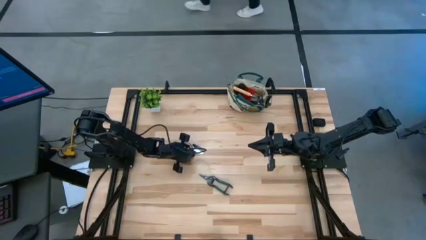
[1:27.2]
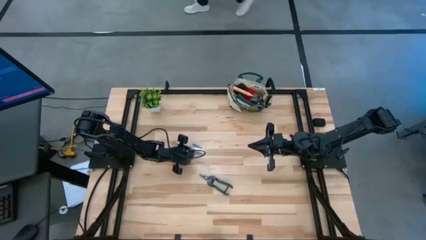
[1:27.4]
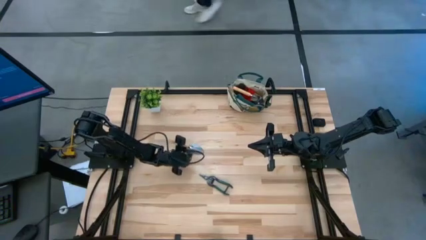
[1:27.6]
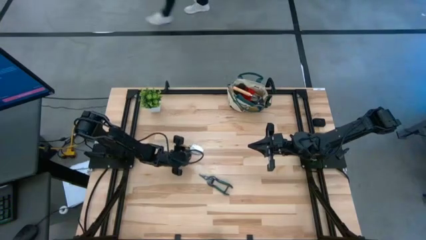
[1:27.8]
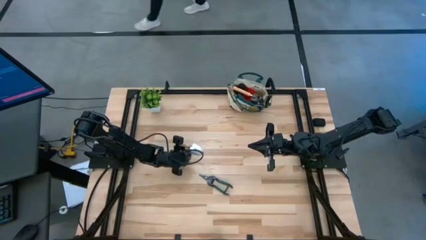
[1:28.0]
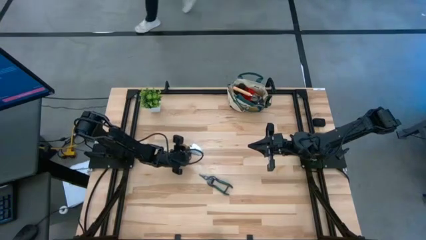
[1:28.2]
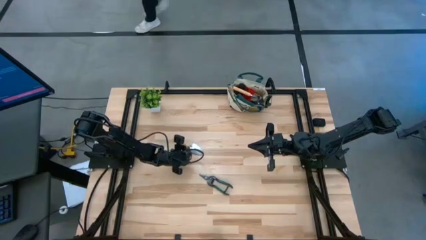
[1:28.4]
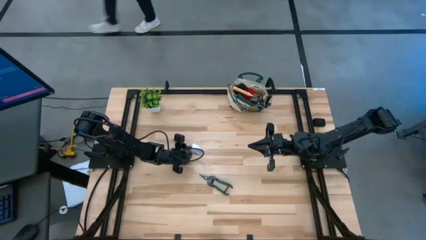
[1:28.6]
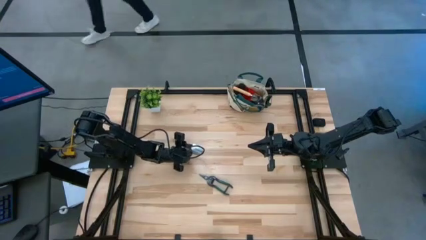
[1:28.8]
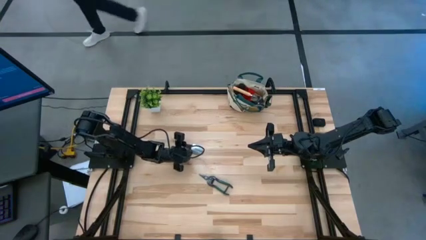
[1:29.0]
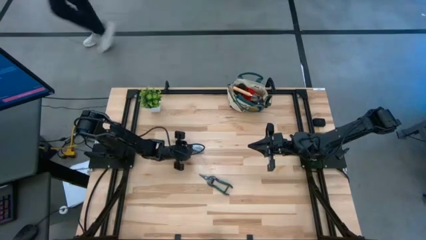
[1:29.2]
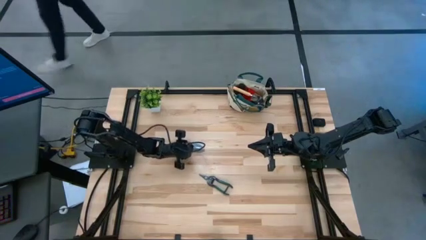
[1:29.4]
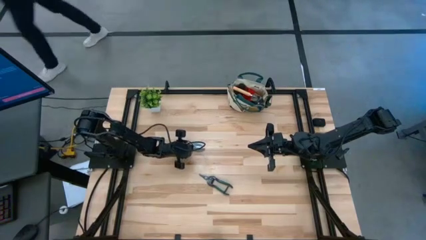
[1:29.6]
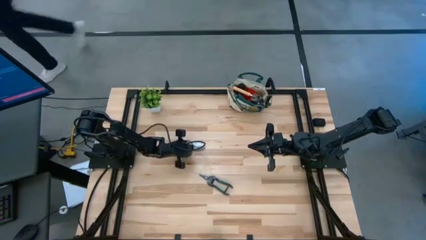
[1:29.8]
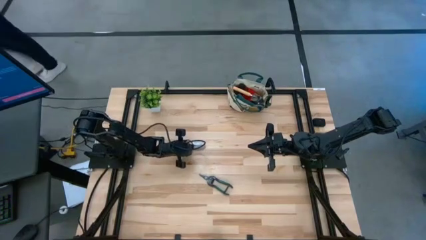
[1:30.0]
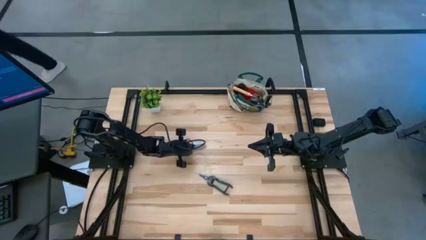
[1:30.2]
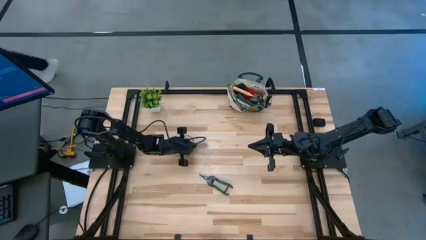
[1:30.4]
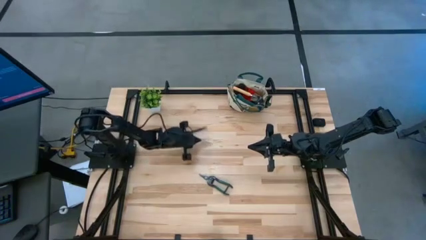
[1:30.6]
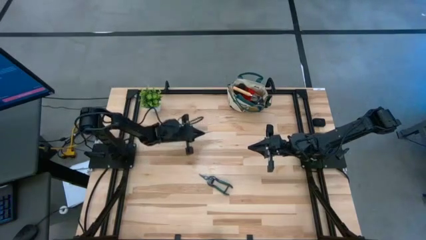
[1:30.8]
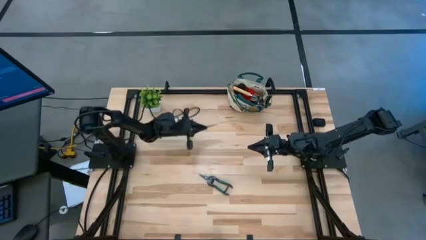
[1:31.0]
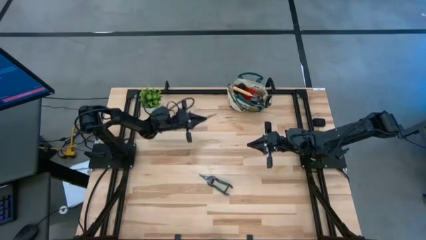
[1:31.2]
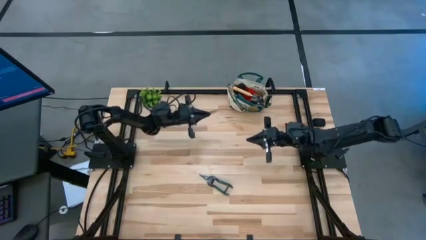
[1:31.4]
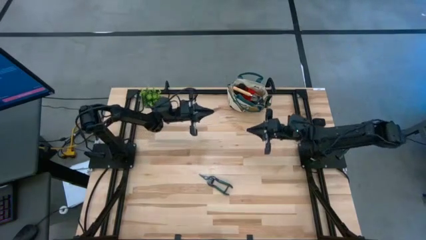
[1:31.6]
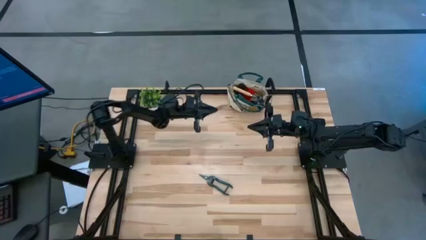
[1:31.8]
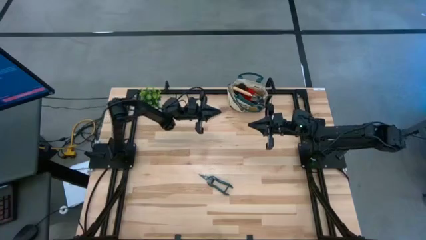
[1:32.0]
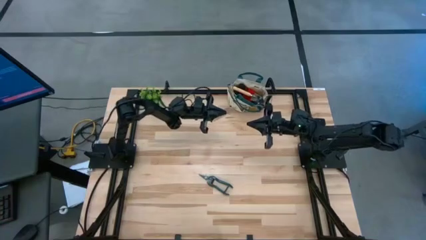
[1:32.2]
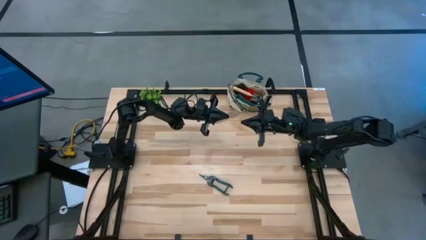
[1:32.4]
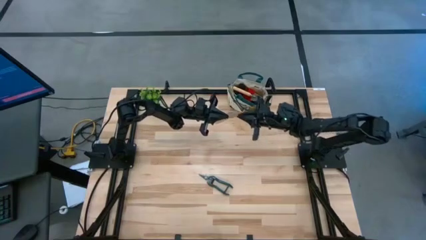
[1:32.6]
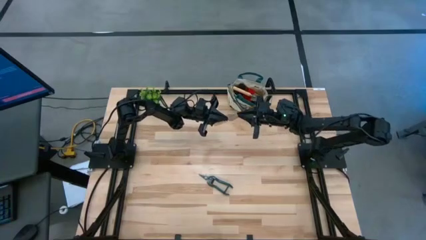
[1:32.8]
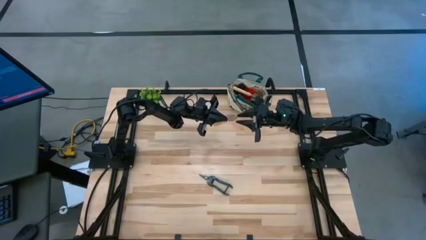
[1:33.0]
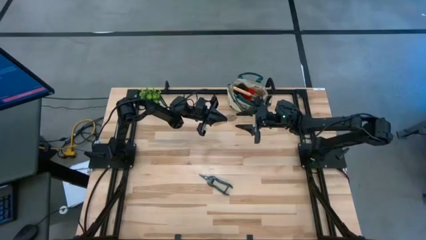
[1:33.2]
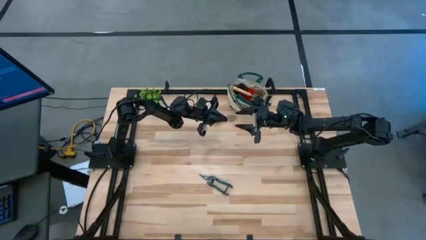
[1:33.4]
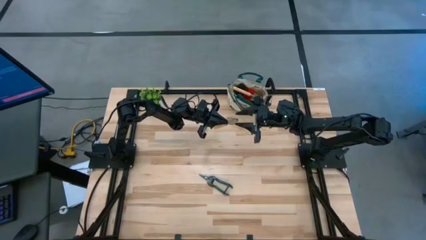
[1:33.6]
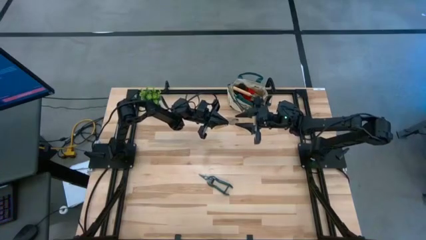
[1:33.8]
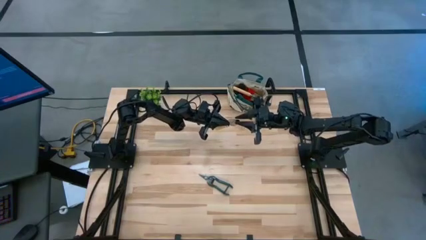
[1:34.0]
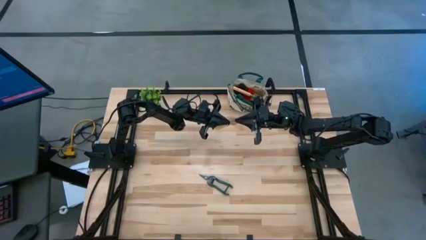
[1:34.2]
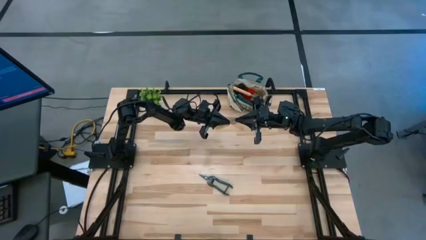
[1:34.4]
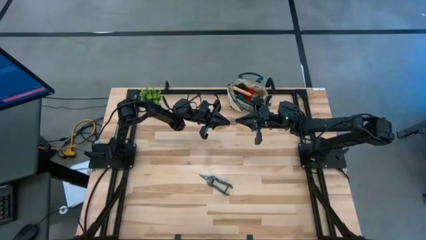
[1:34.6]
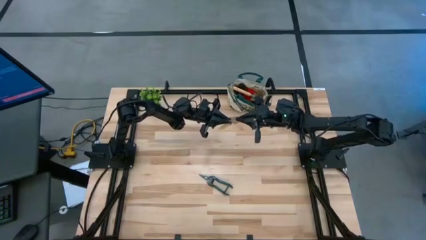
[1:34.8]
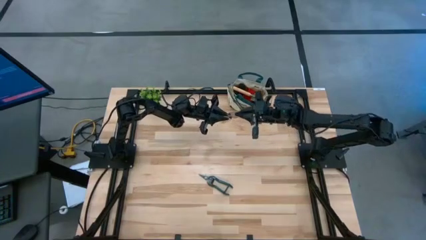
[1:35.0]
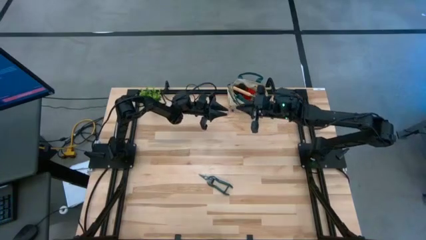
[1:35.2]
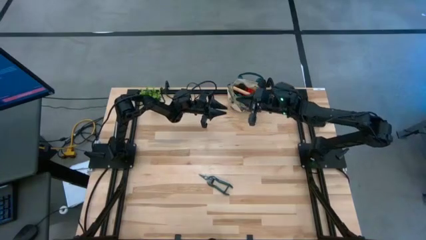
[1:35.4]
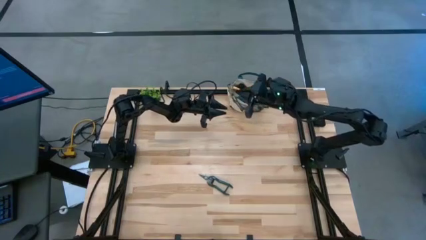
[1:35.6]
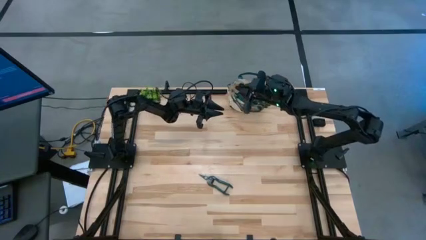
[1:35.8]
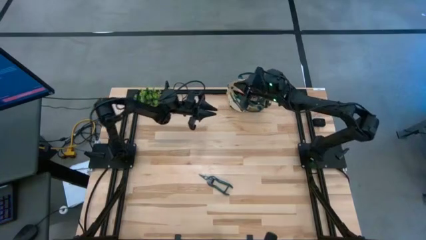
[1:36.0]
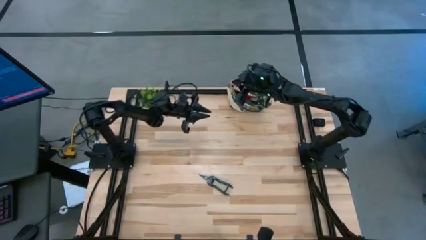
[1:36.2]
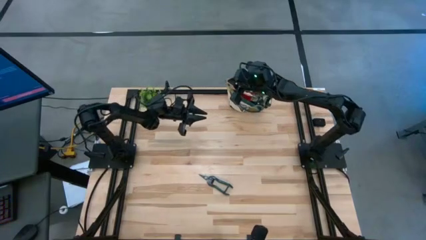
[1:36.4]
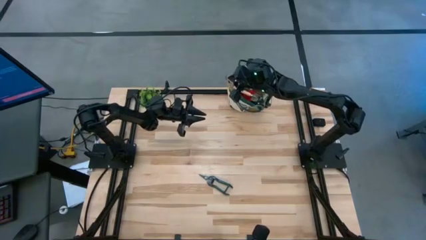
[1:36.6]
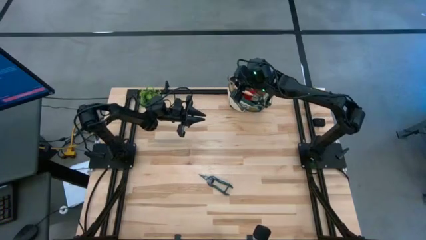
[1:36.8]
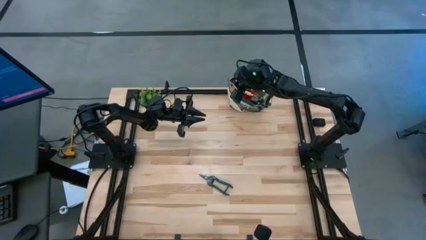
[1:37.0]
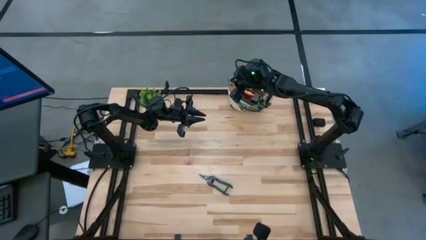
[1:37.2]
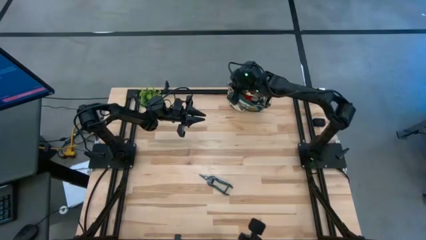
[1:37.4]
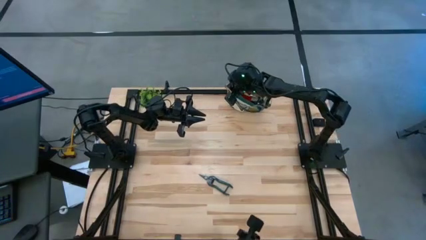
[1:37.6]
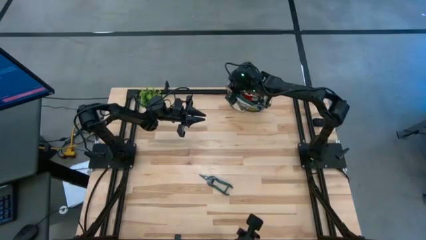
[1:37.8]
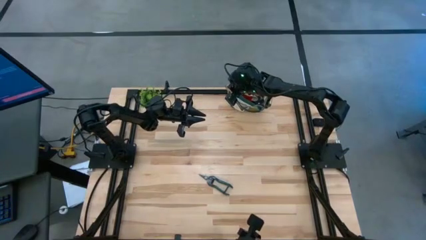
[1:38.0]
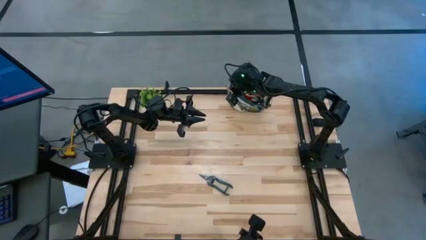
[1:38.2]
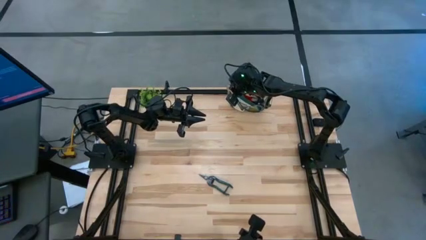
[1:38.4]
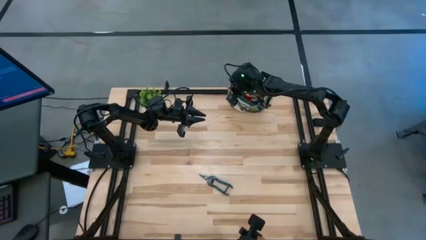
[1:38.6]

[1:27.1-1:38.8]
Task: Pick & Place Garden tools in Gardening bag
Put the brown trowel into the gardening bag

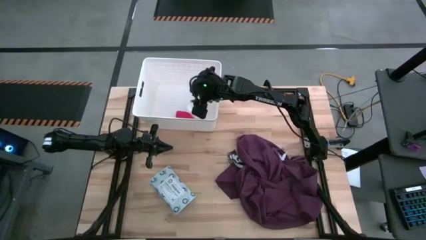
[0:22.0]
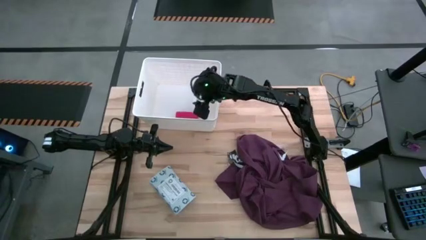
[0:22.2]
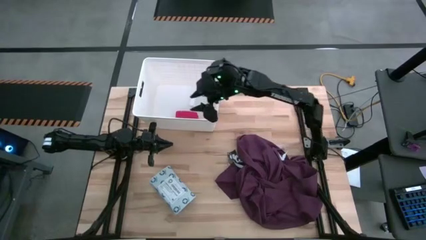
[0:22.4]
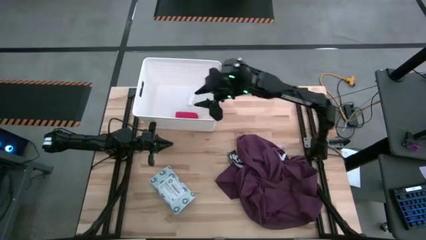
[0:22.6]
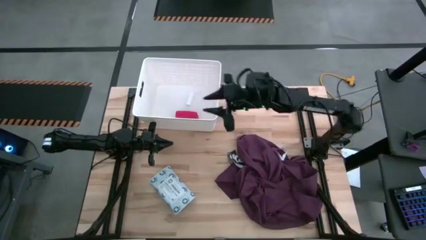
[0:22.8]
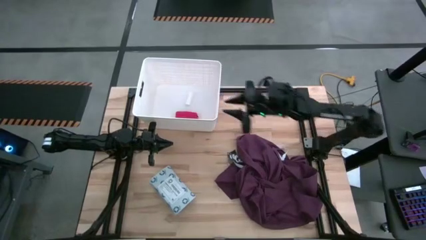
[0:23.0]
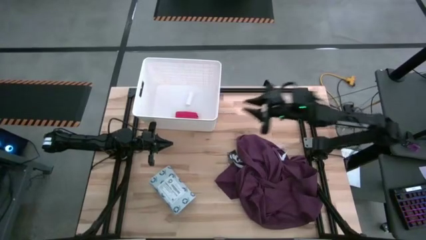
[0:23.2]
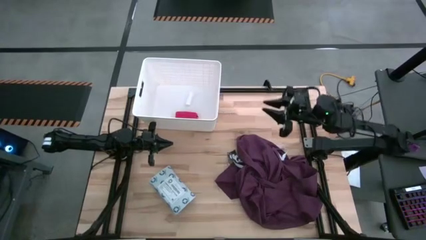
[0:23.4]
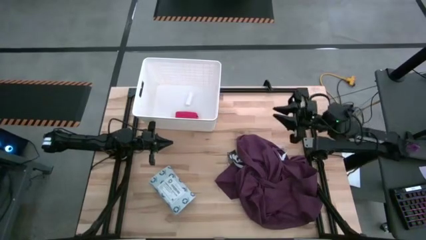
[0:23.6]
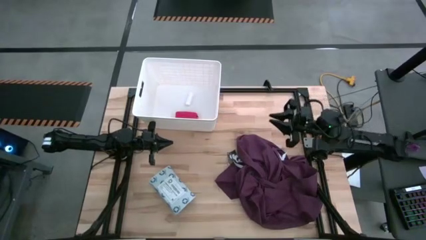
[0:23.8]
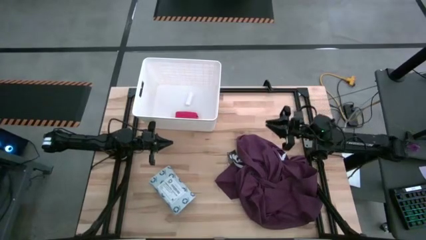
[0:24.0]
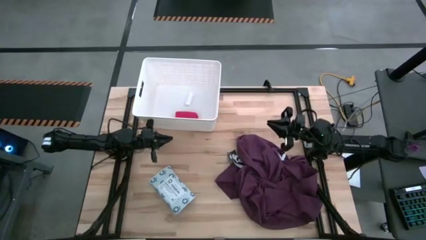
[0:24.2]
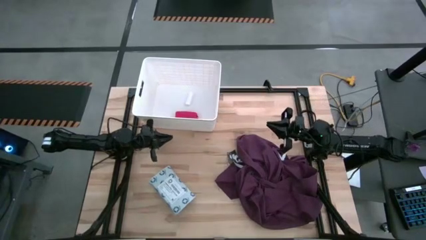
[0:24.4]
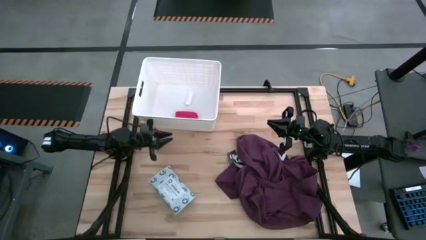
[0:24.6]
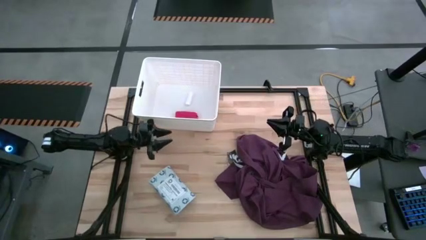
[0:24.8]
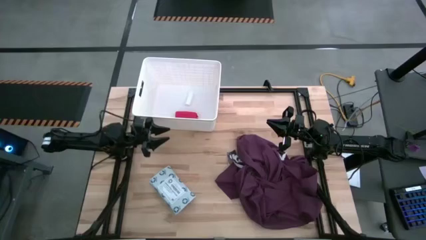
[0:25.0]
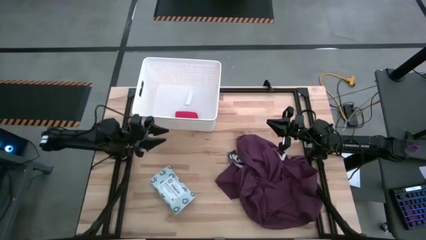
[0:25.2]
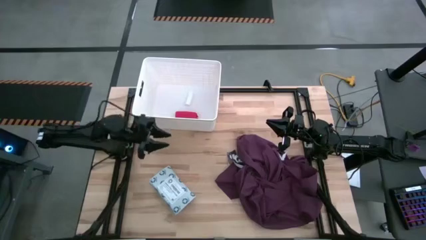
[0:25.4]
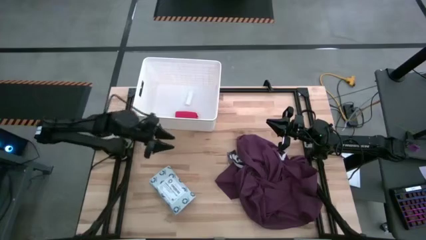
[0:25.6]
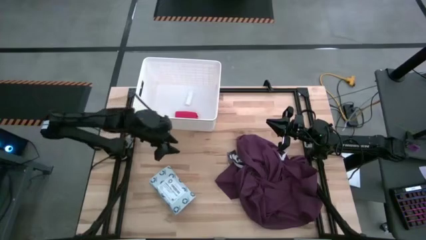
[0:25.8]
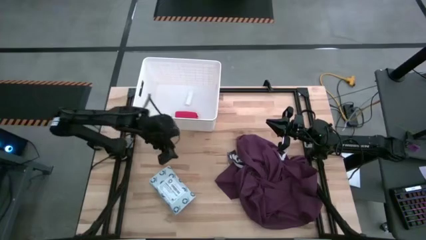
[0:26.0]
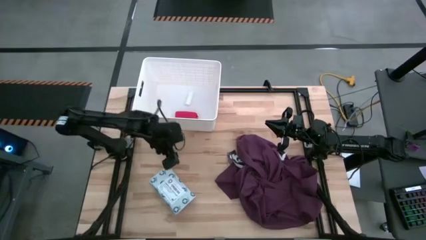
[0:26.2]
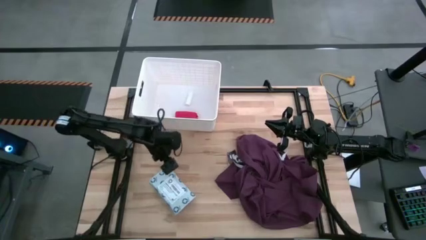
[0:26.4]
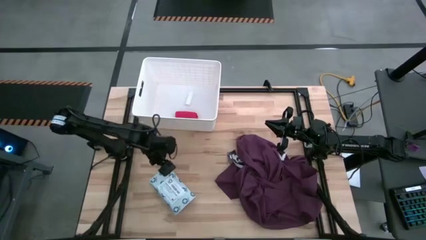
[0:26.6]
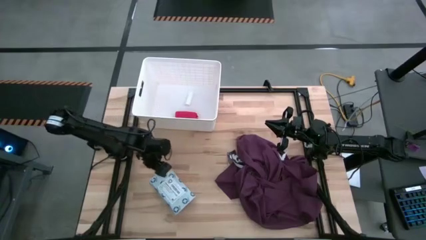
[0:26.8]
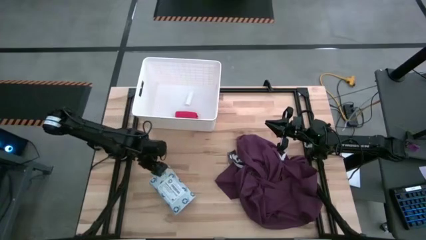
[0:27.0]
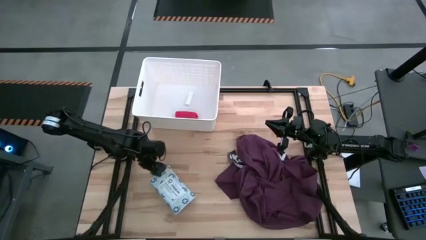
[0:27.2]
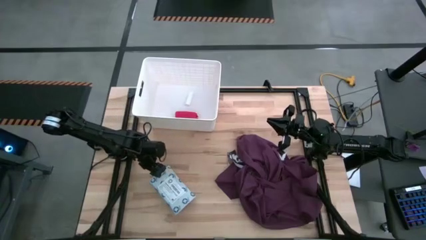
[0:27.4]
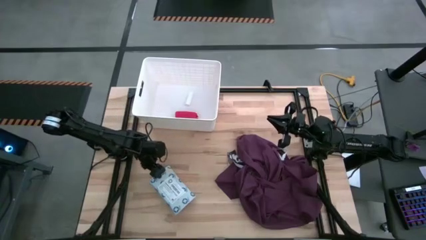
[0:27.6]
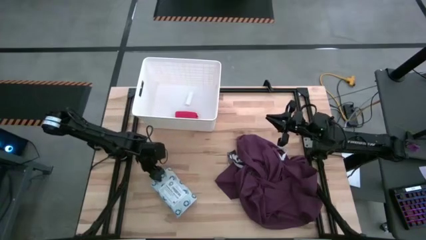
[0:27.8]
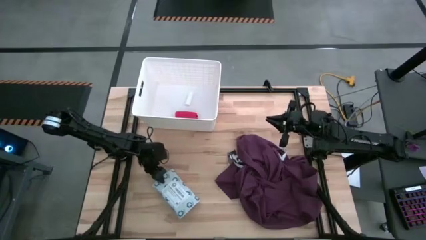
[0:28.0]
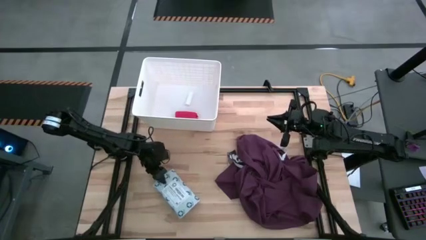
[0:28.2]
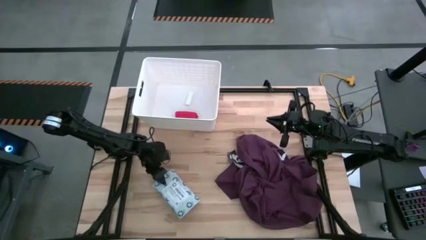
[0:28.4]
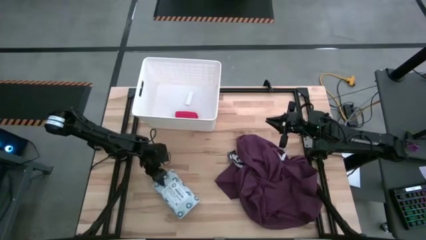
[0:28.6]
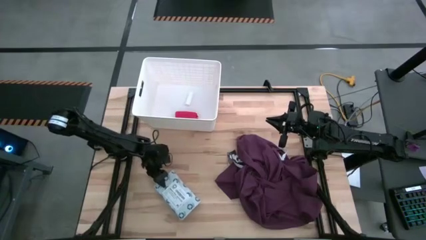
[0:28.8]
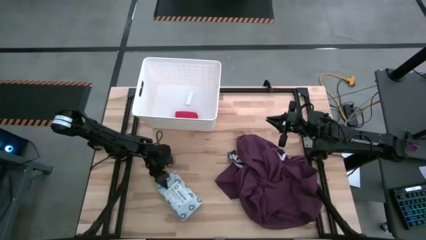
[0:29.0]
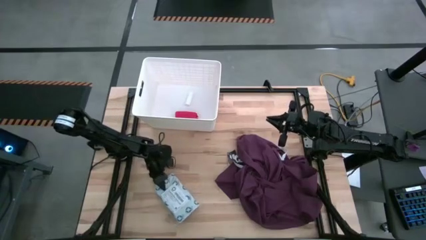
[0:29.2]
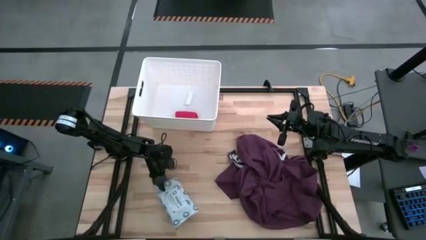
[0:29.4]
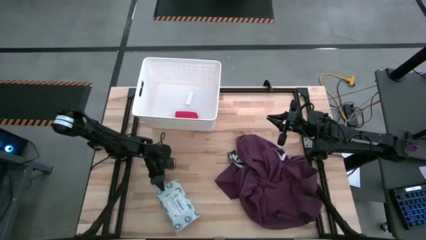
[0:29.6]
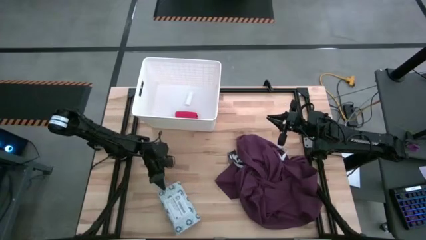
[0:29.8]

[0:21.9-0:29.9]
Task: Pick & place medical supplies in basket/bin
Put the mailer bag into the white bin
